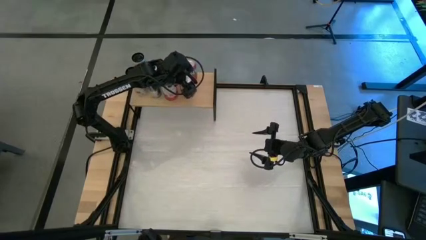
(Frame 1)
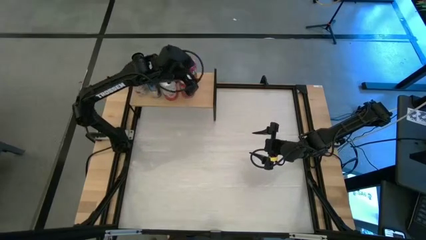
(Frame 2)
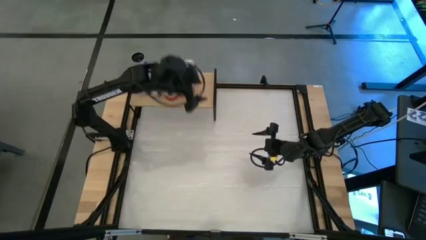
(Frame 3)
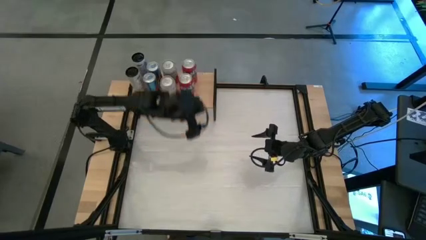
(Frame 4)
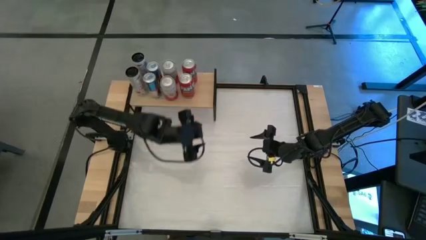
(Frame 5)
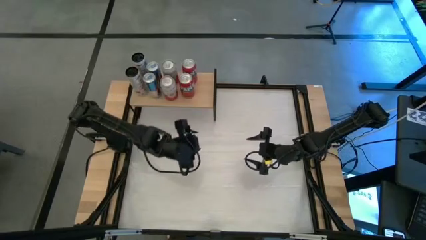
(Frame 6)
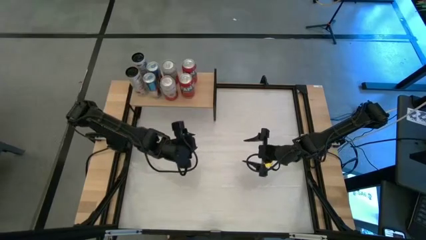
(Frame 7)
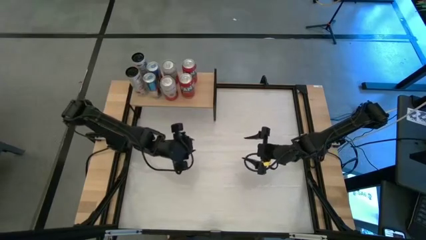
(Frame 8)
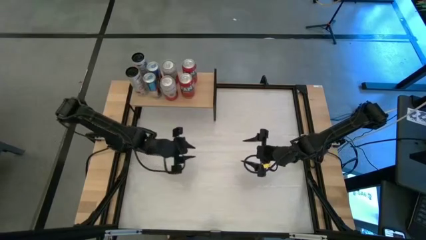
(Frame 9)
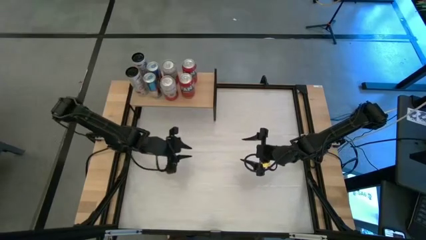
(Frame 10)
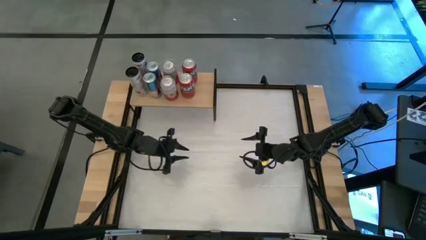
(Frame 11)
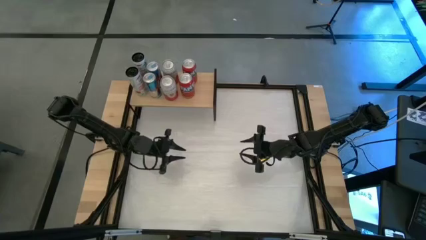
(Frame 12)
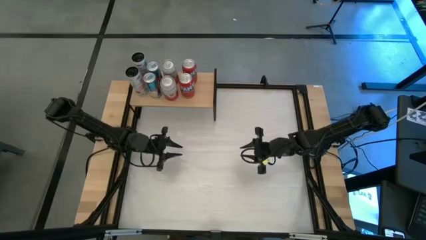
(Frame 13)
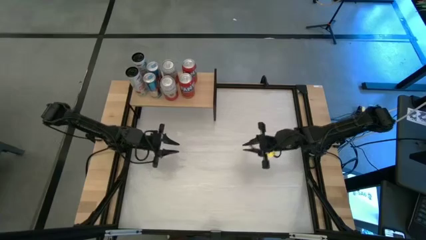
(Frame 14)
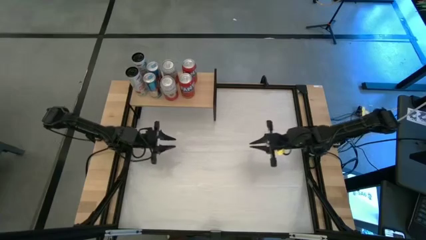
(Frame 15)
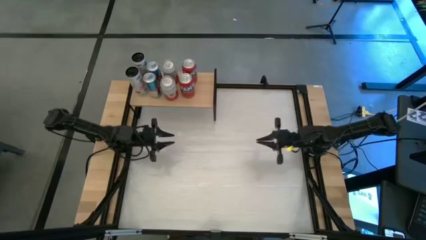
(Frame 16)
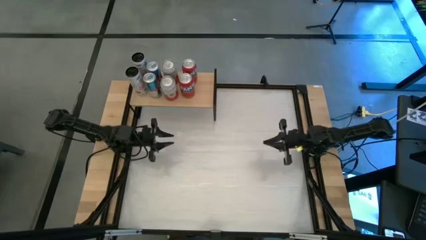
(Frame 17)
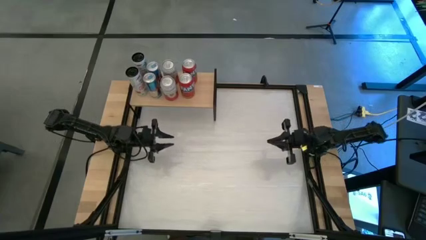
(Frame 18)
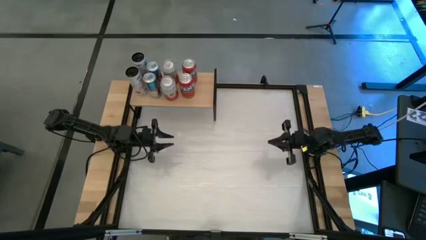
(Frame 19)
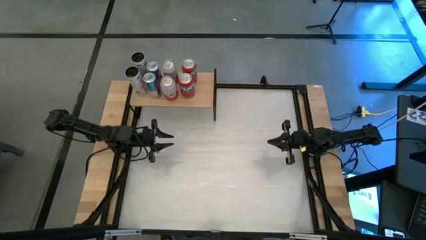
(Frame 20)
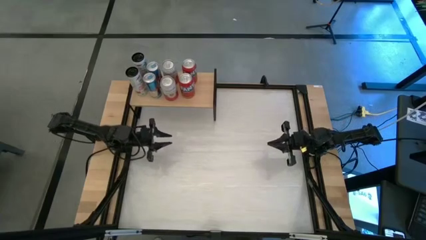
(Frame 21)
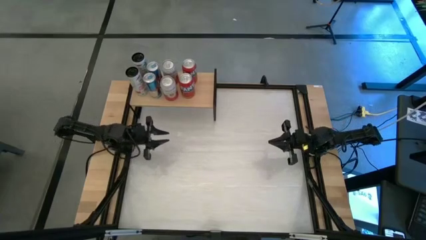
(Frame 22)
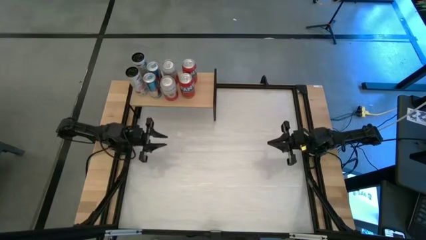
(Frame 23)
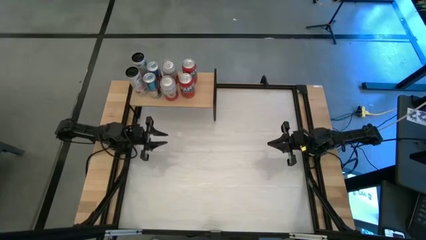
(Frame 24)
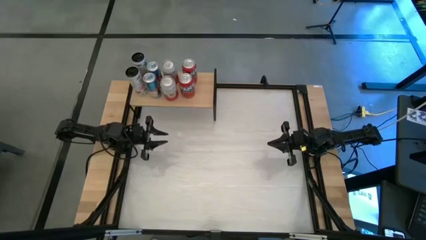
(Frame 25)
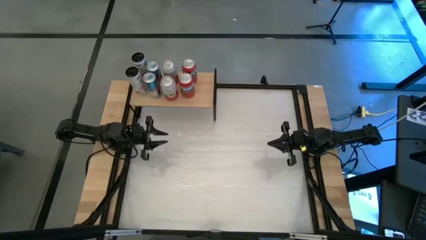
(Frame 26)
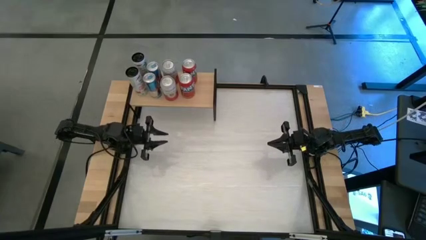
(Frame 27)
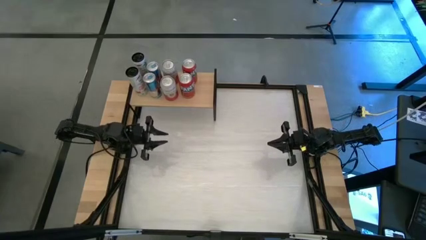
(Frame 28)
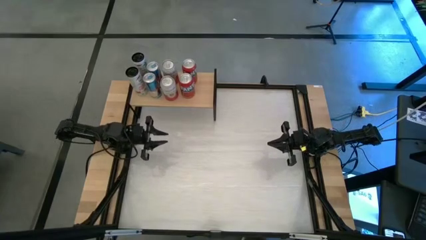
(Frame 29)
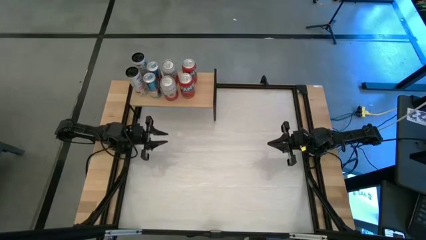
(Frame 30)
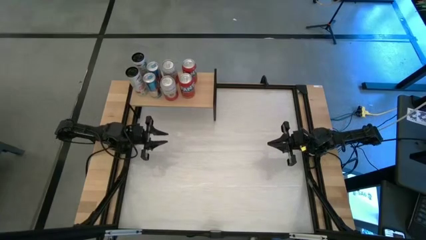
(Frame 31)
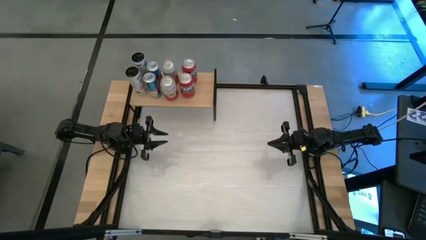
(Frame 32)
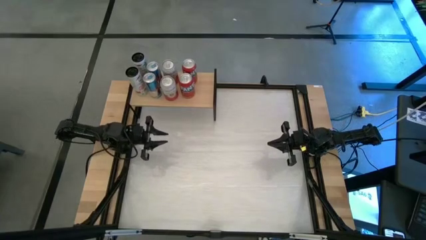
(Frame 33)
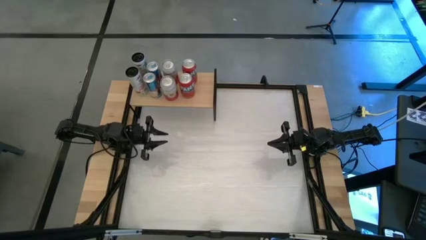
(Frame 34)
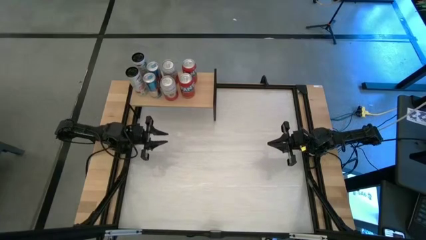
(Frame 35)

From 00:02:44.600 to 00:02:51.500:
Task: Place canned beverage on shelf
Return to Home Position

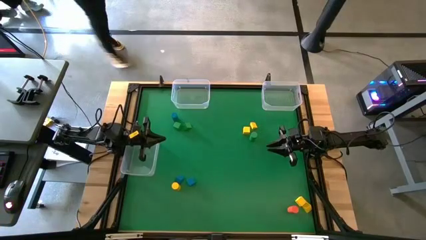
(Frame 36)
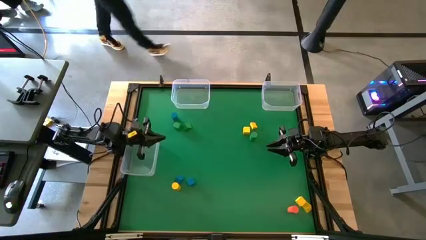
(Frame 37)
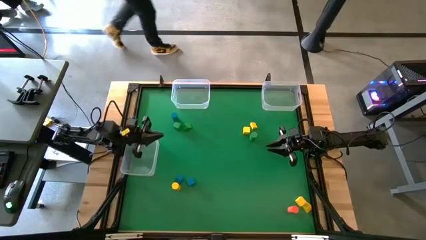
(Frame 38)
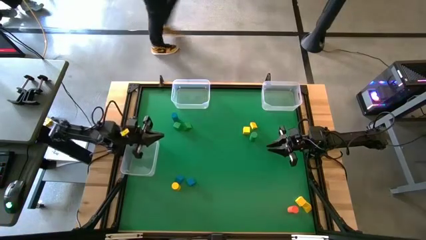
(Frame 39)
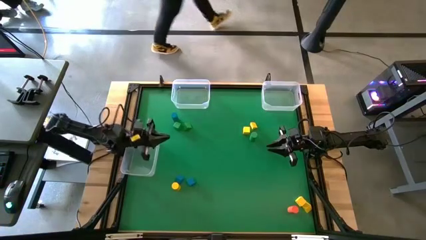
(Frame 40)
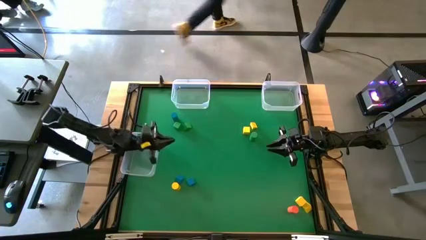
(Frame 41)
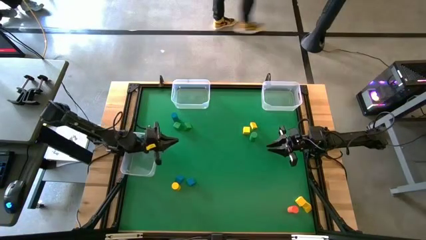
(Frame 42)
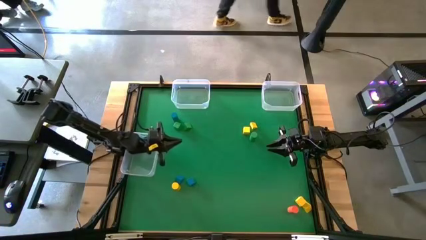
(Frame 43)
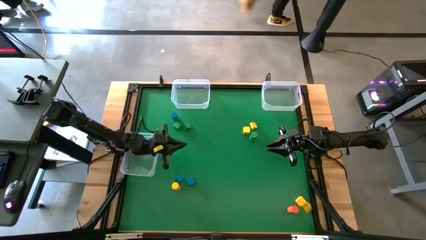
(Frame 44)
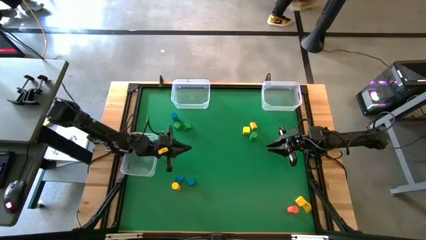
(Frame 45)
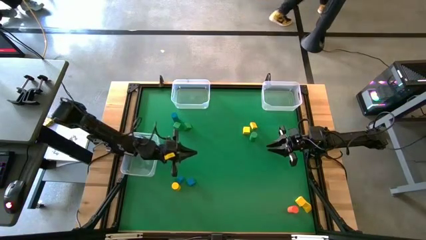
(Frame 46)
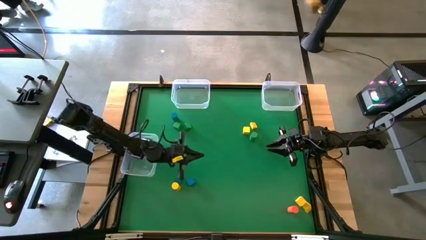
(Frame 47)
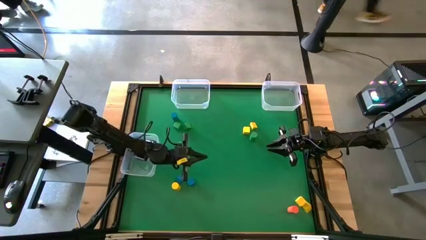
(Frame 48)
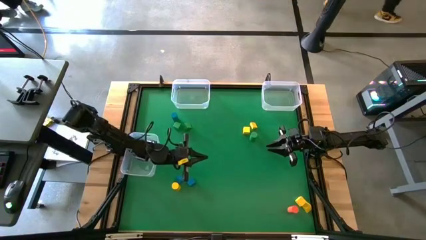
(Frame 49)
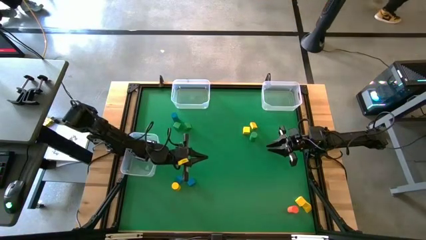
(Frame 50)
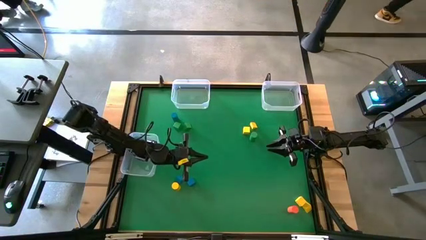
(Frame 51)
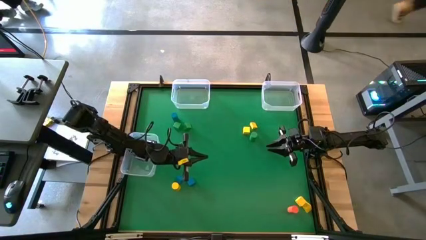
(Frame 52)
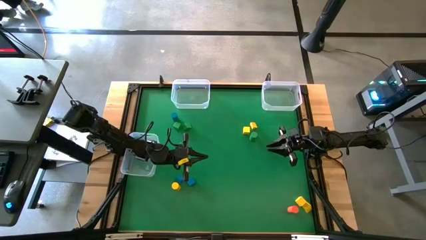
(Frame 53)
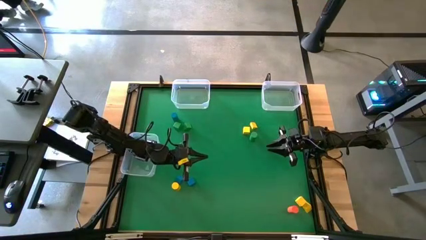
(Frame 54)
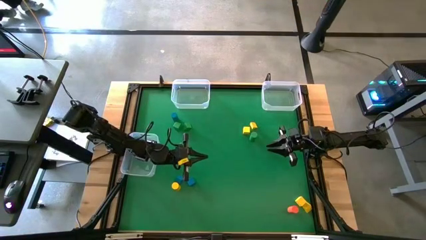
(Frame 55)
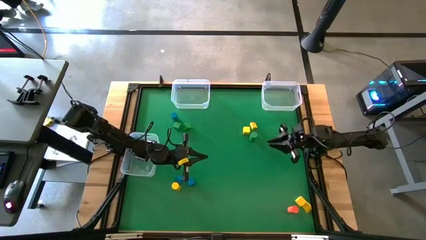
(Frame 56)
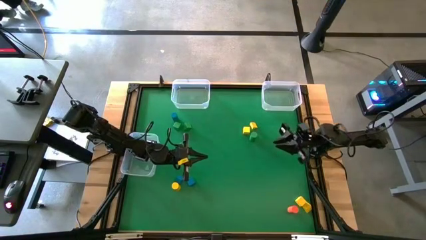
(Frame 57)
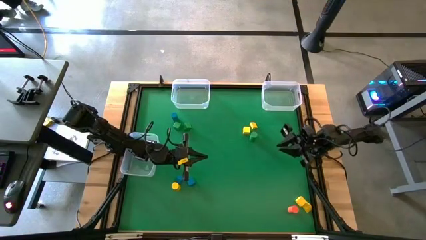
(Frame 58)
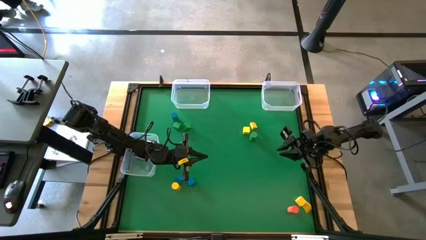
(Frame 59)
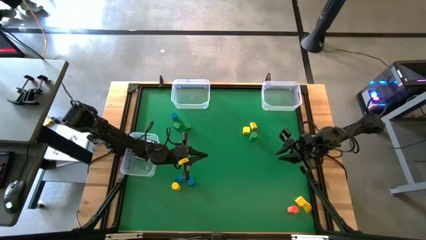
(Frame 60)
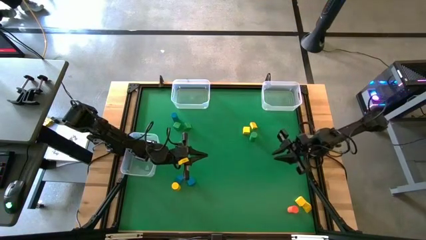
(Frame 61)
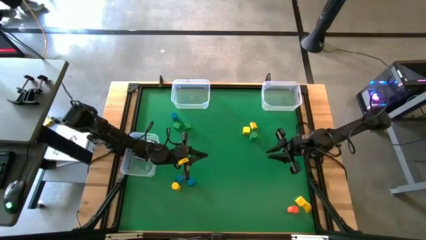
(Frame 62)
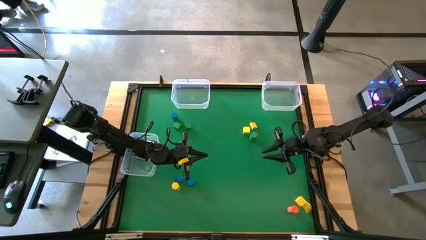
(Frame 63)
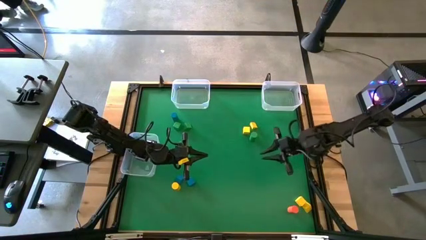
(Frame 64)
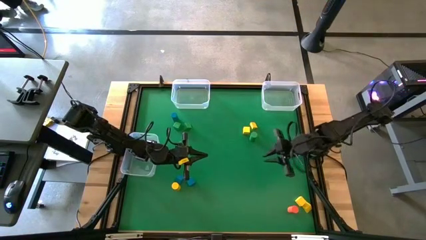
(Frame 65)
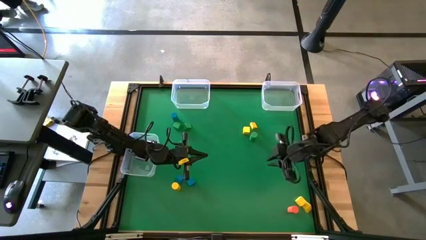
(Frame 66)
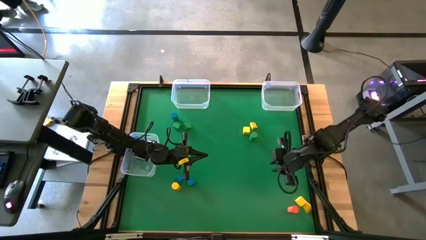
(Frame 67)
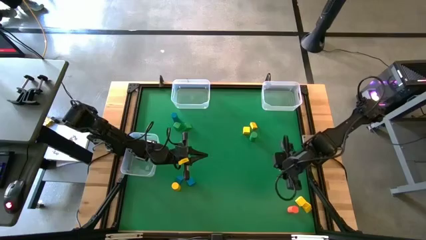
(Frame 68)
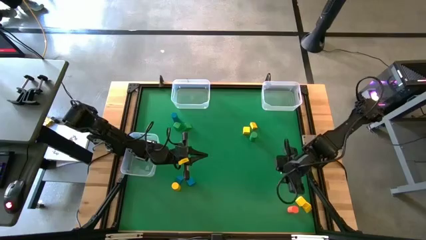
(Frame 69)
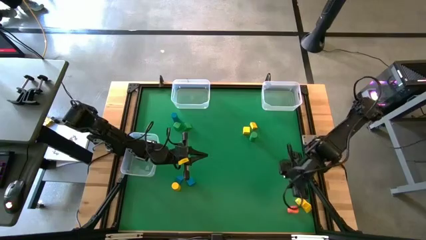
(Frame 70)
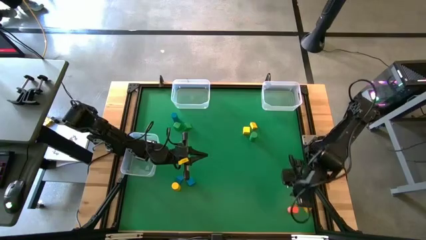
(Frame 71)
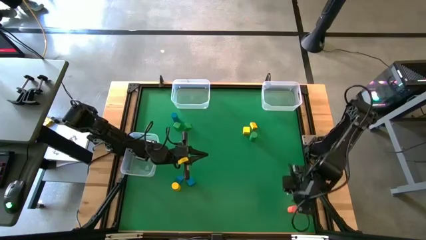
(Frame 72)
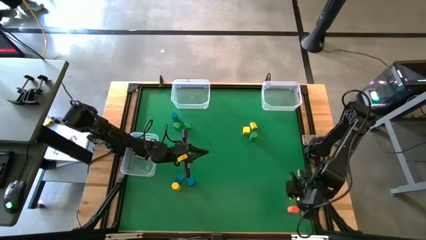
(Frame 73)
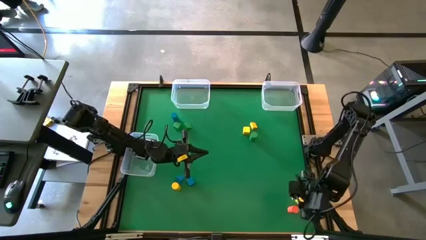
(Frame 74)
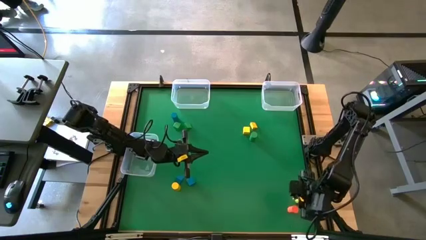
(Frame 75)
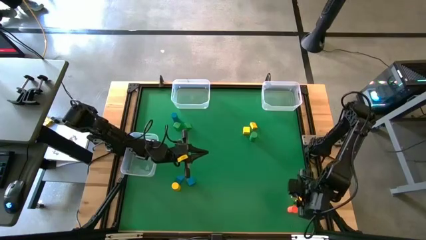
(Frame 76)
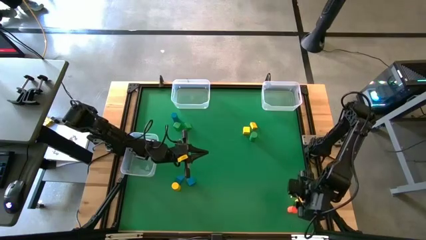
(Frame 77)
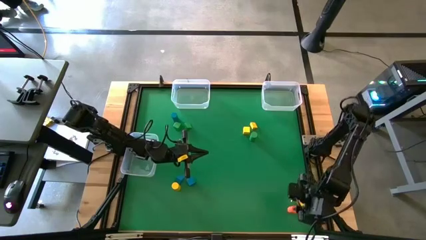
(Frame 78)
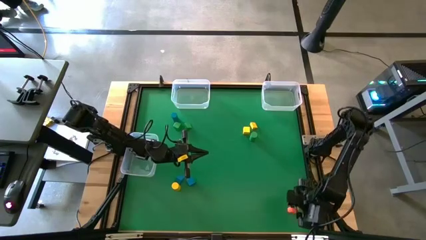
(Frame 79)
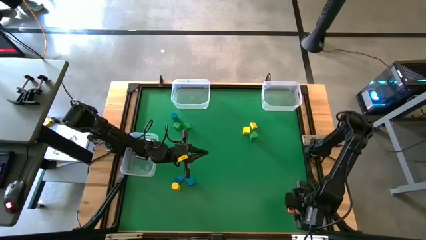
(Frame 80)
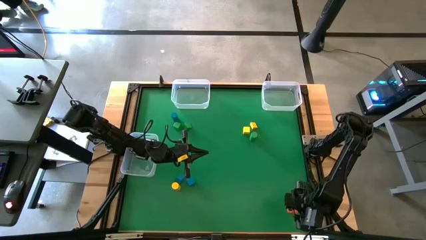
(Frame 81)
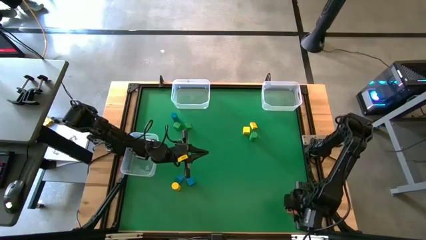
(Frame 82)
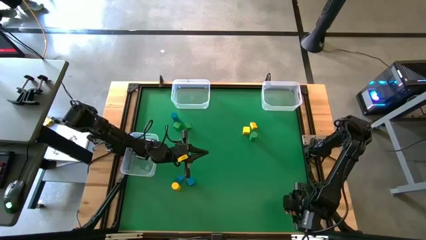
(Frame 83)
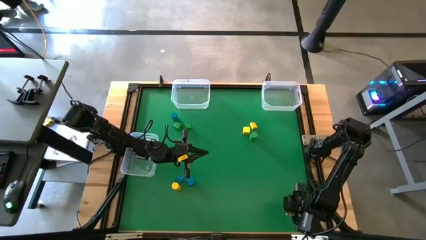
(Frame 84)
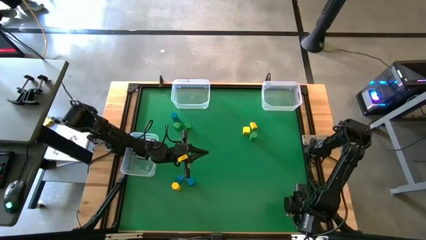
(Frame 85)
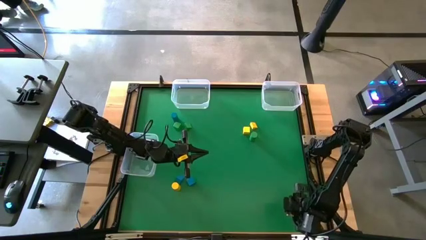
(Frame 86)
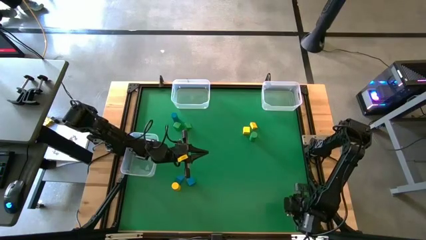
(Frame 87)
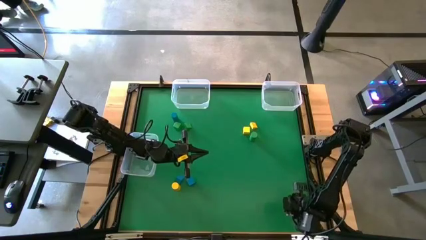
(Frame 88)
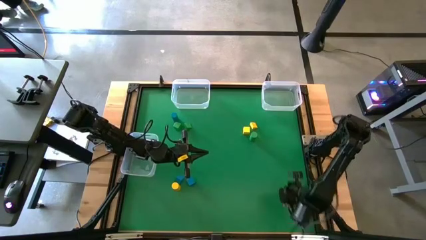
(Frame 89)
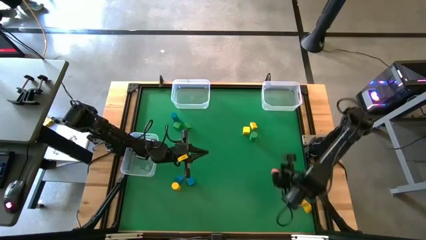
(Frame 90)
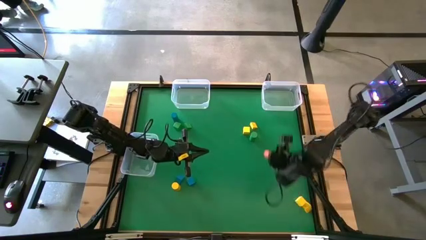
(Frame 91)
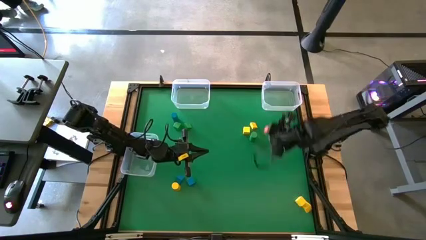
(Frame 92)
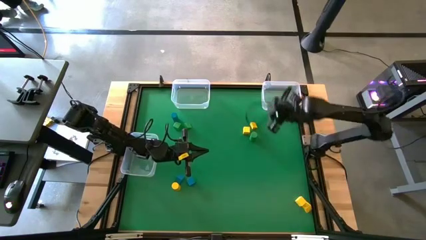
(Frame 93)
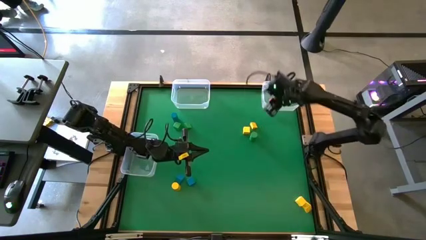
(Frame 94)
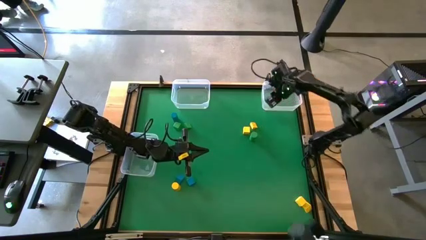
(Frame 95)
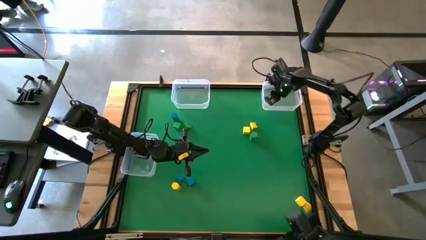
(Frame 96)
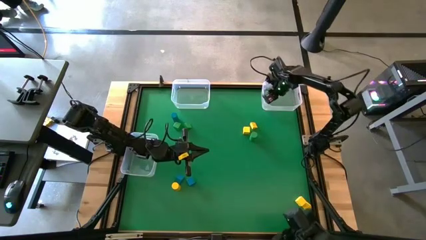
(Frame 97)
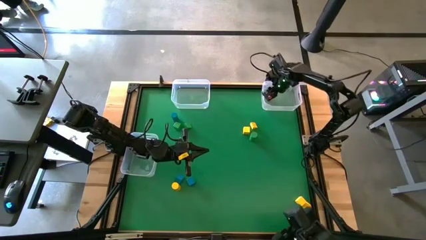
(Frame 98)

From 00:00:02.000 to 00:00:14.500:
Task: Sort blocks by size
Put the orange cylindrical block into the top right transparent bin
